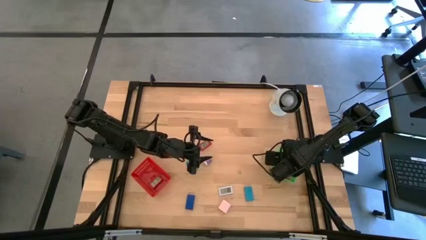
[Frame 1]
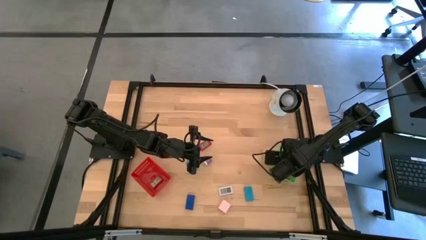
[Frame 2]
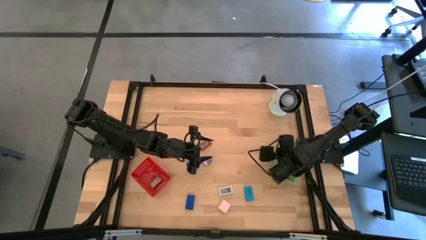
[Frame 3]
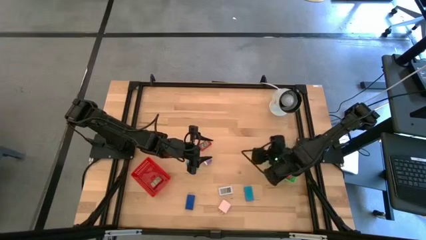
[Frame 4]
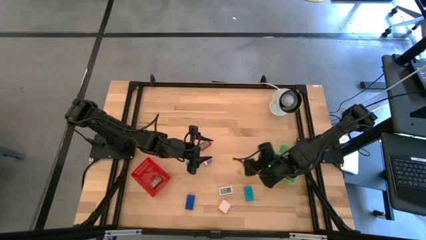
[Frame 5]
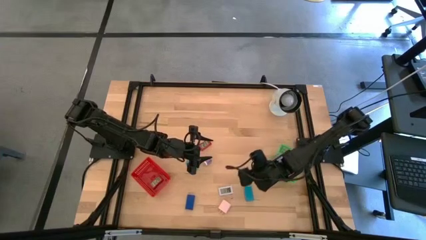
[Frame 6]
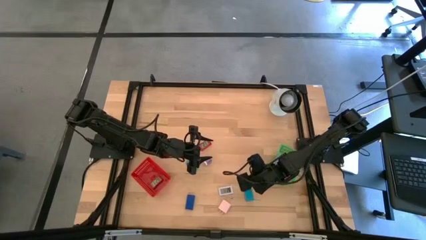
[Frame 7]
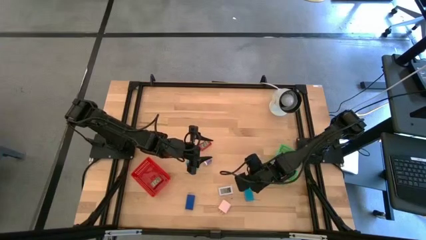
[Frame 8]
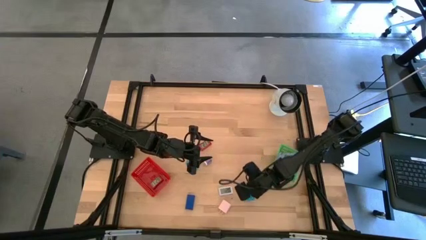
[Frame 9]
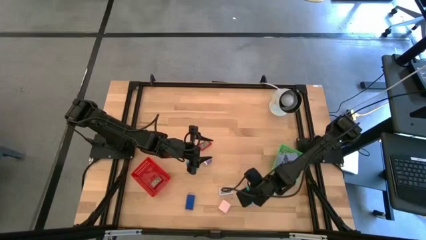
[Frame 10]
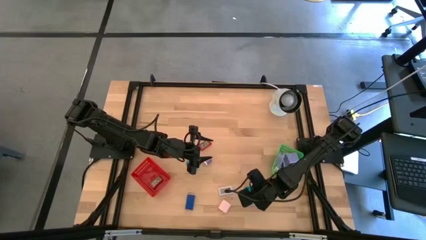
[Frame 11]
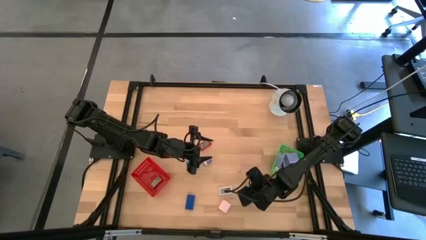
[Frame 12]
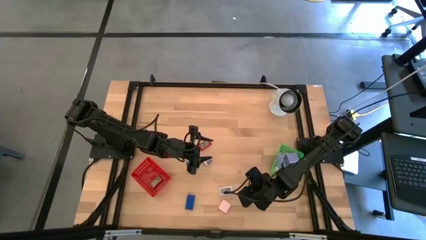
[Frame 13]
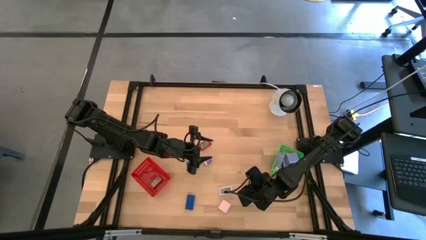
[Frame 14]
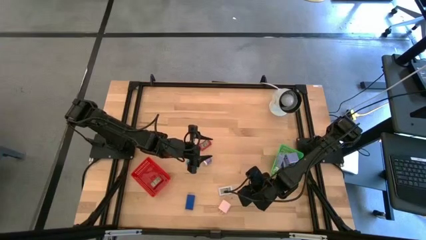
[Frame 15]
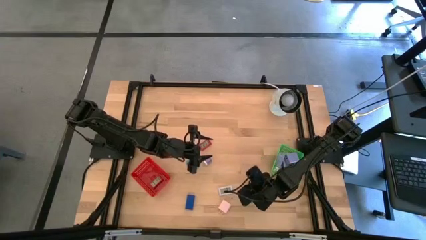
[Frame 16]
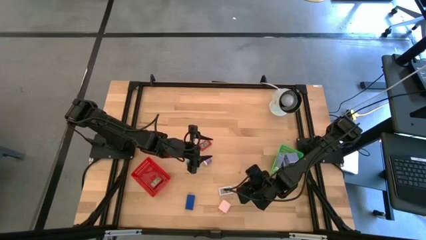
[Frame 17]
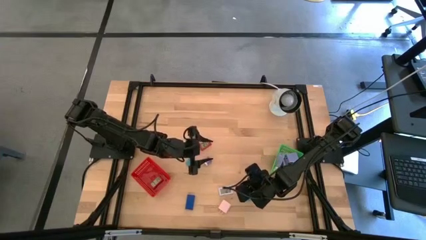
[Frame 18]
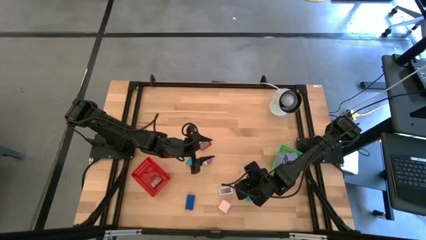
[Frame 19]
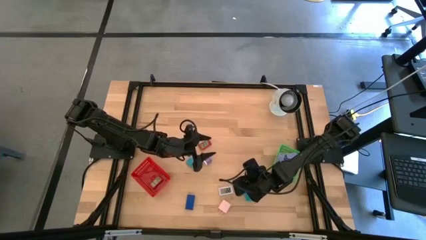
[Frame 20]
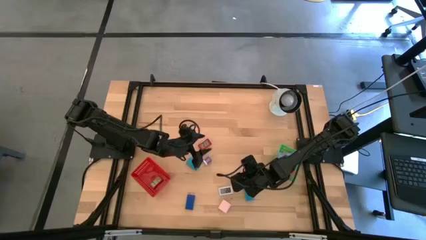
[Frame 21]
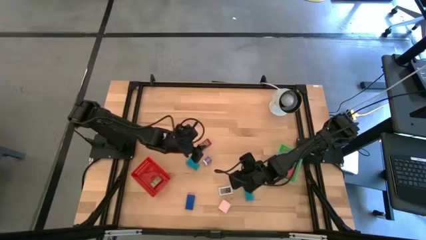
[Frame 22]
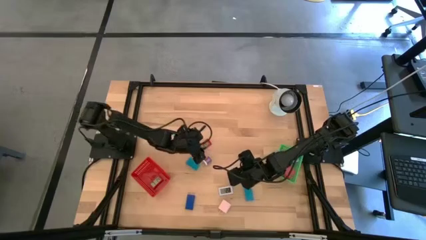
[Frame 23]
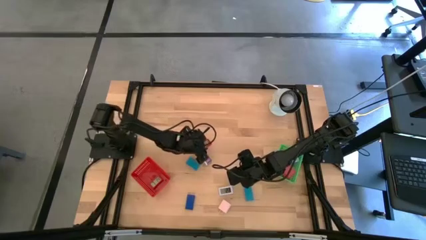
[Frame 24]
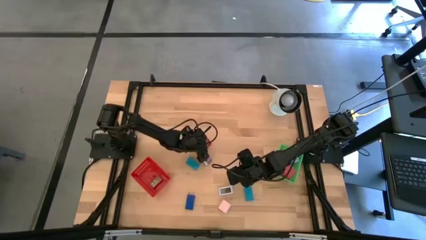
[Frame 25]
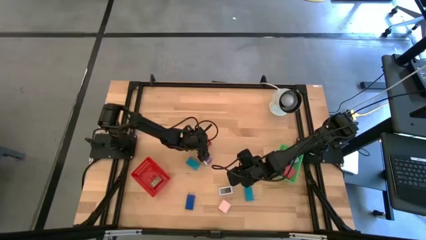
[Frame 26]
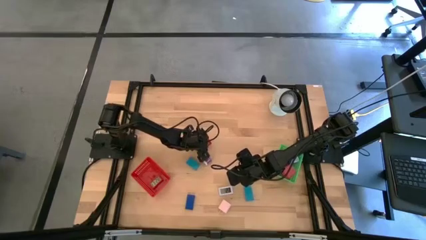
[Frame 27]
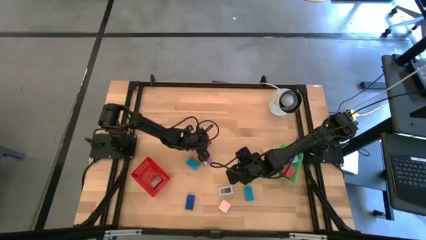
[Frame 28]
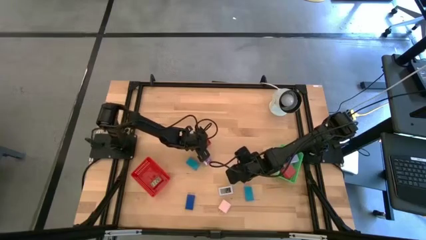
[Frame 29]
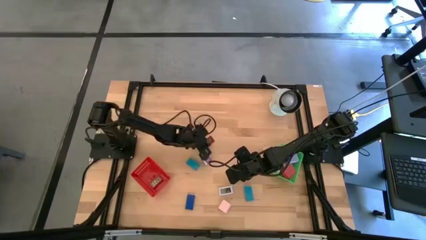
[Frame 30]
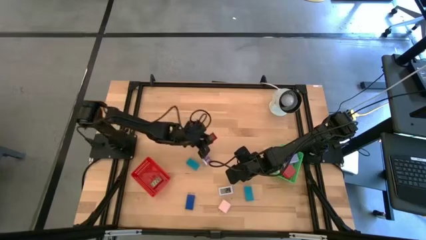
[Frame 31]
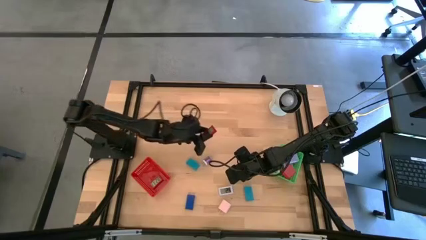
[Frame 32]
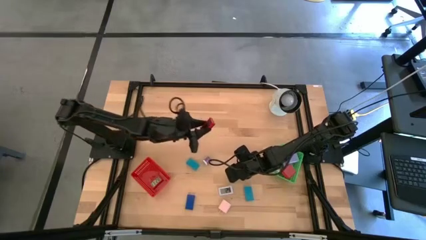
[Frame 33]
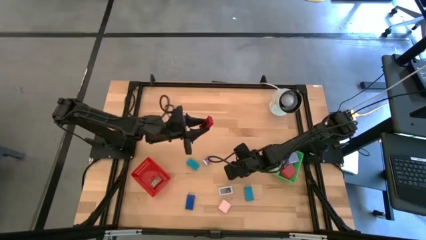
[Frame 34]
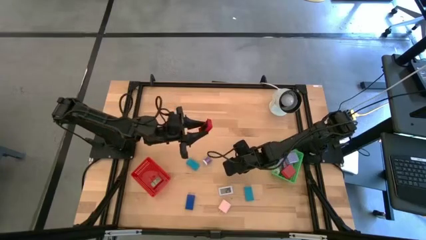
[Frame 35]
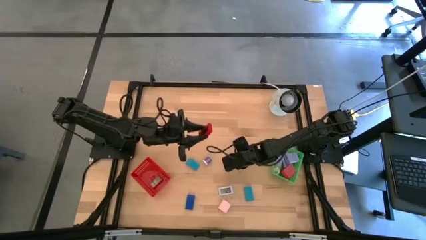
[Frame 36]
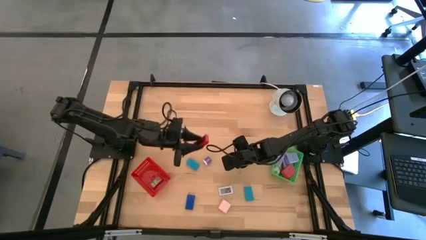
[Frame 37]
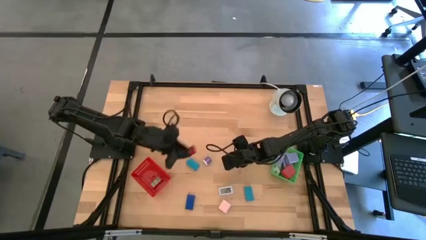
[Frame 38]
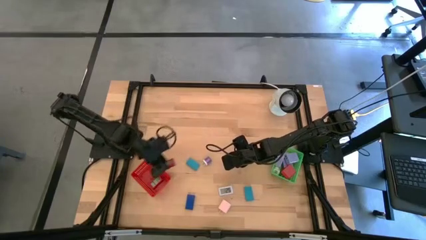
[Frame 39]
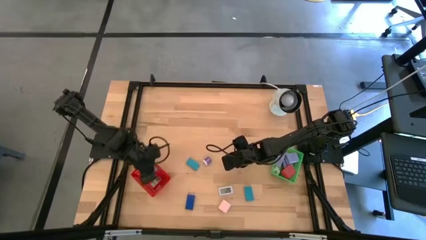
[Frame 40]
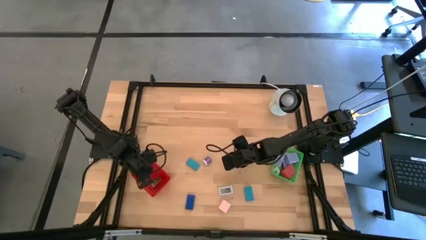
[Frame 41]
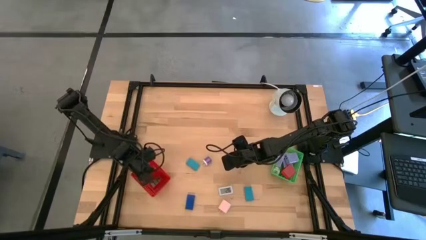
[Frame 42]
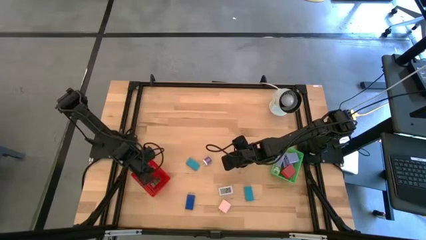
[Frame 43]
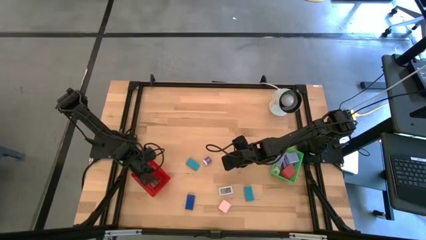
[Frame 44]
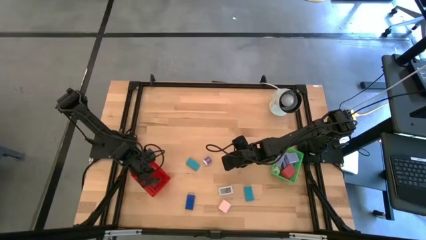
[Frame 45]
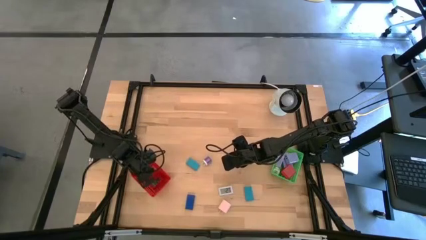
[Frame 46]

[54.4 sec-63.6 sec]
Task: Pick & Place Office items
Put the red digital clock into the red bin

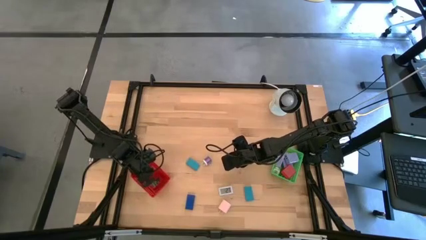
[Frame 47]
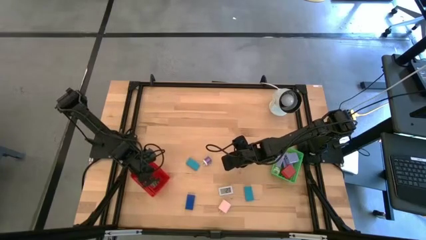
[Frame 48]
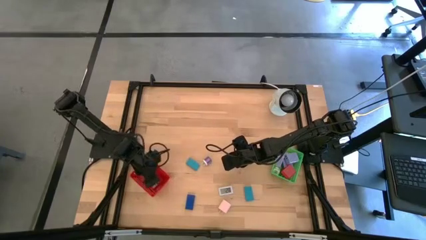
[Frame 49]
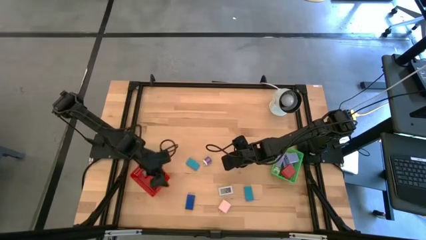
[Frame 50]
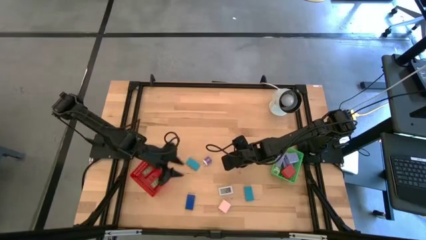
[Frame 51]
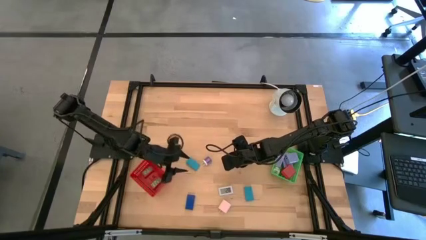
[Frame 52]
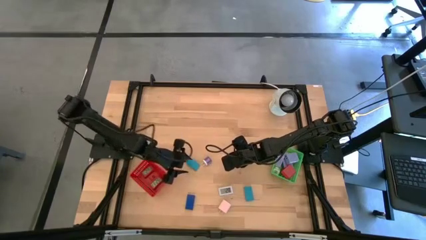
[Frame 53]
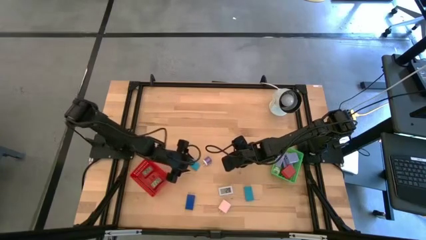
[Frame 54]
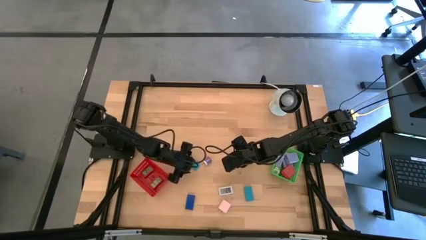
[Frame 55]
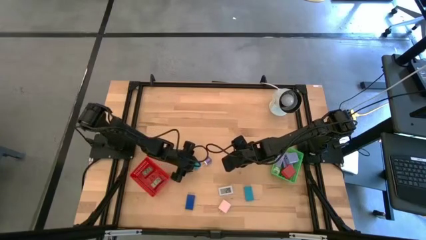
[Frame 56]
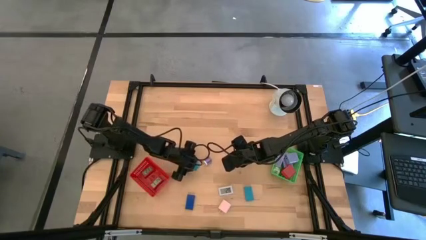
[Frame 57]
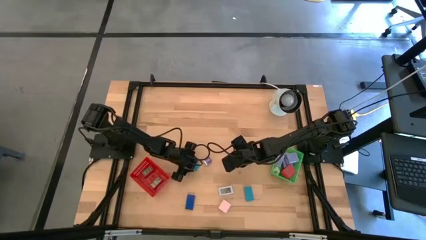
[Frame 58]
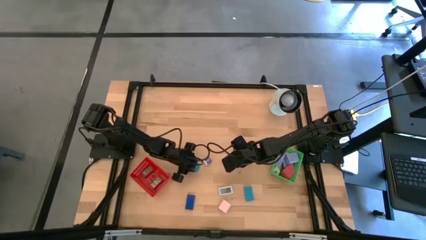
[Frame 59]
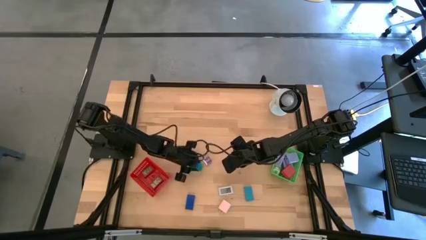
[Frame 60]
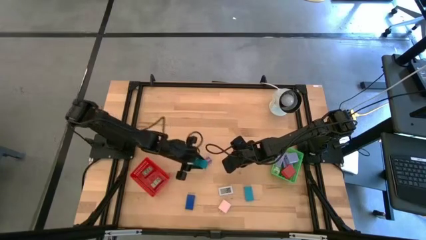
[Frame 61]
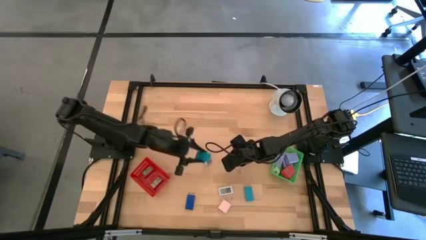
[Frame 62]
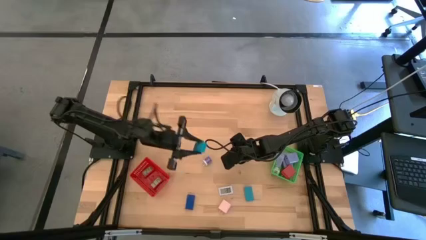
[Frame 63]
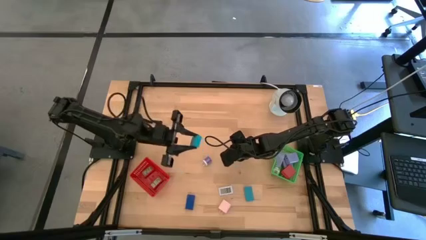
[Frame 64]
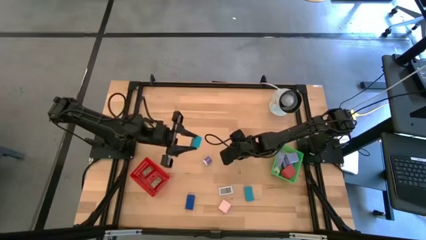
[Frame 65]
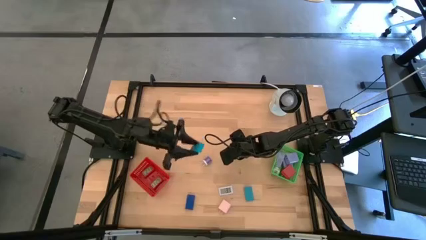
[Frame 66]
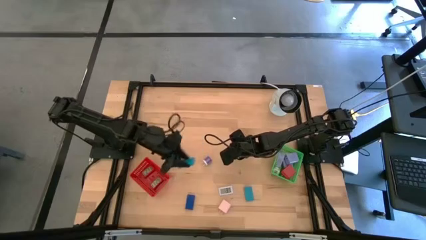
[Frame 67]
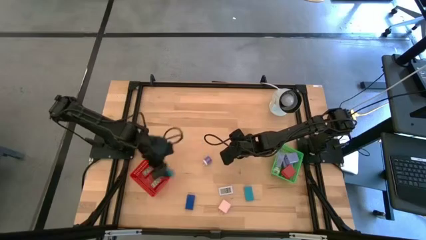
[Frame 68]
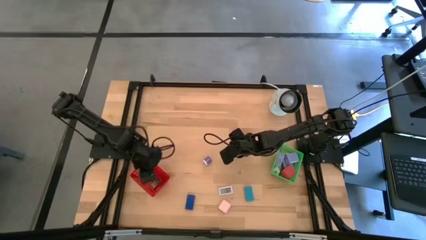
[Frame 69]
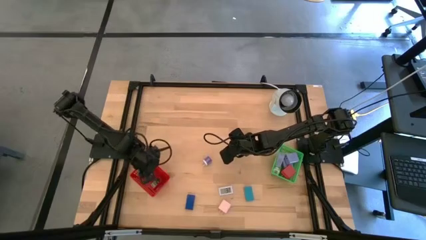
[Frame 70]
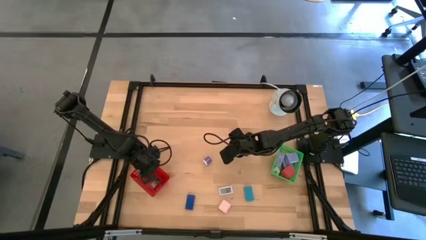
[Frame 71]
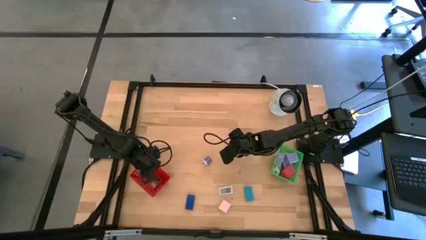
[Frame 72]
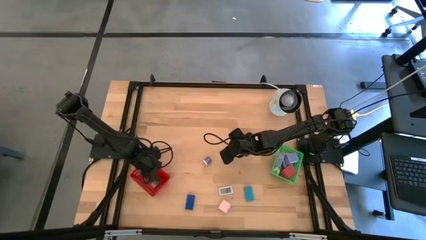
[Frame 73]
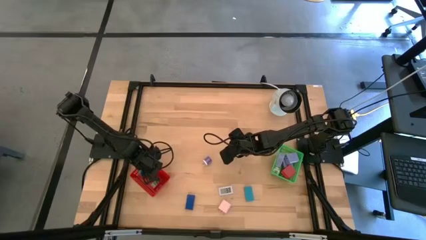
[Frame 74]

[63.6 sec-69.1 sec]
Put the left light blue digital clock into the red bin
